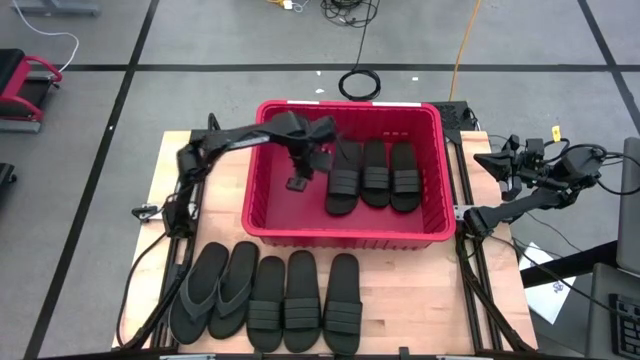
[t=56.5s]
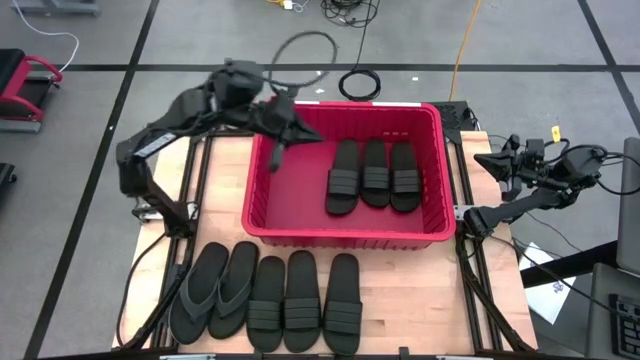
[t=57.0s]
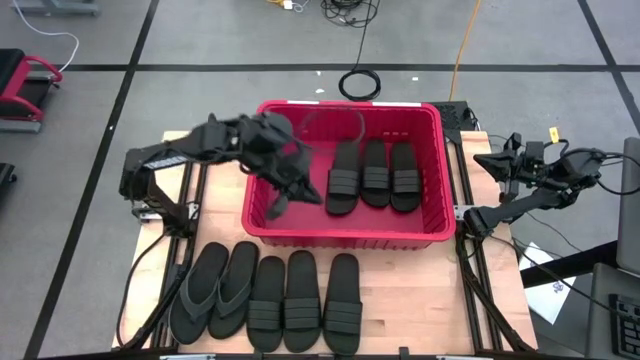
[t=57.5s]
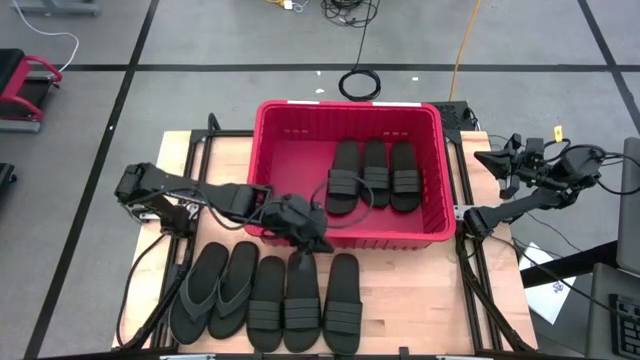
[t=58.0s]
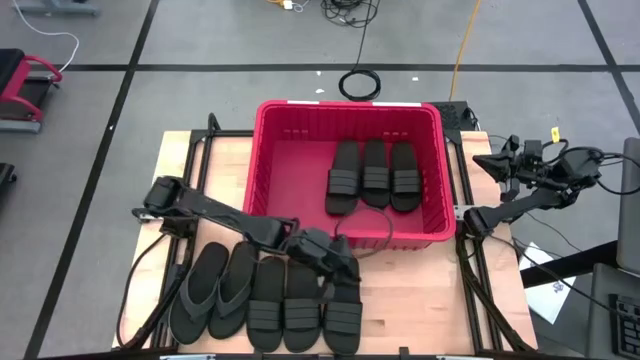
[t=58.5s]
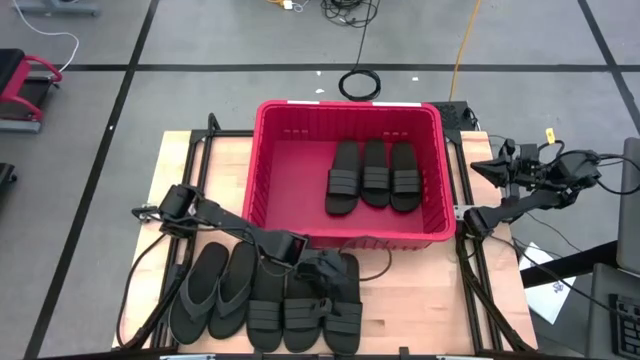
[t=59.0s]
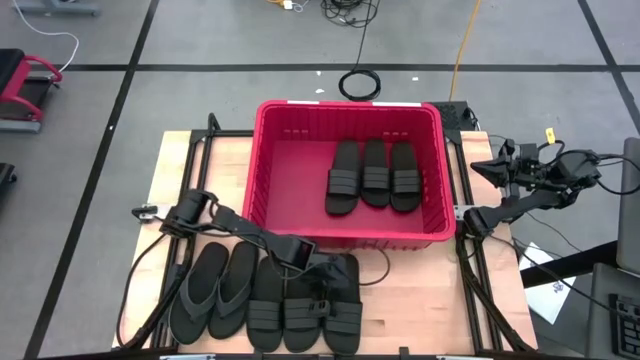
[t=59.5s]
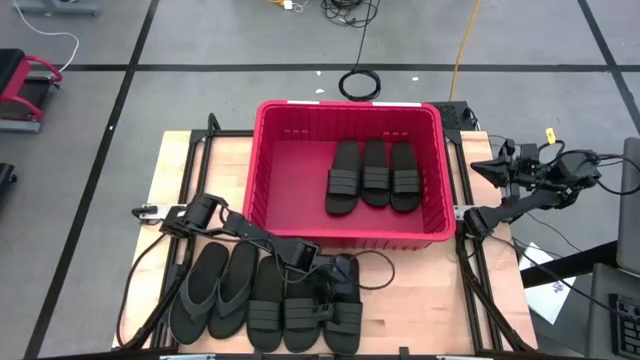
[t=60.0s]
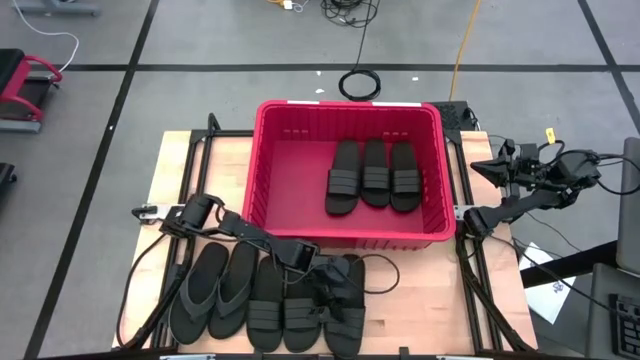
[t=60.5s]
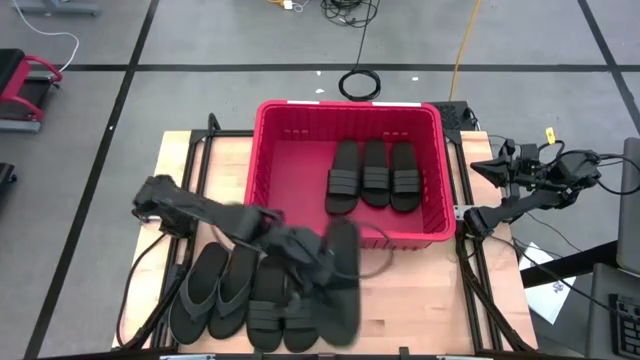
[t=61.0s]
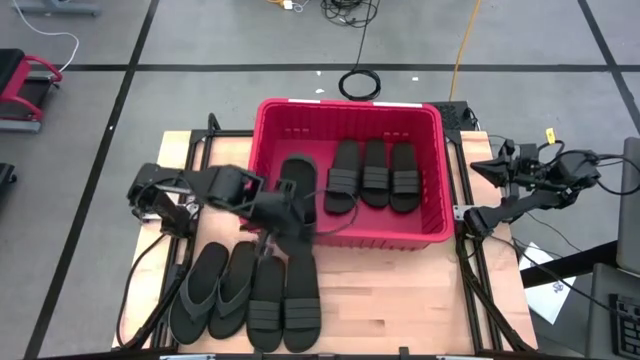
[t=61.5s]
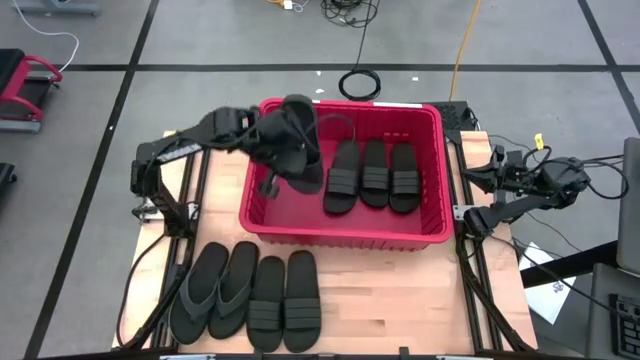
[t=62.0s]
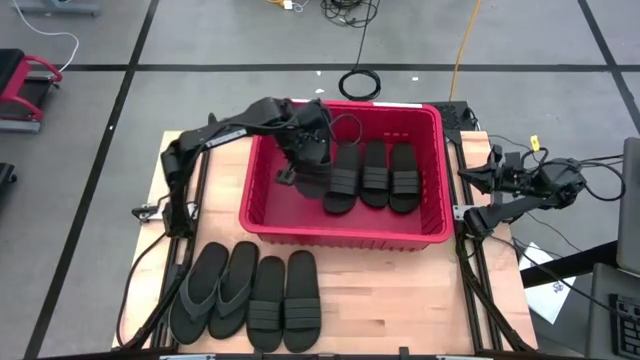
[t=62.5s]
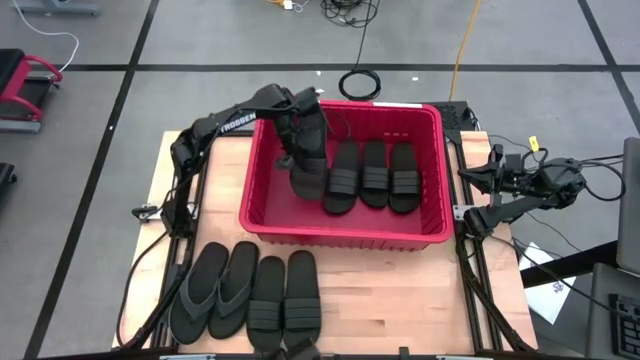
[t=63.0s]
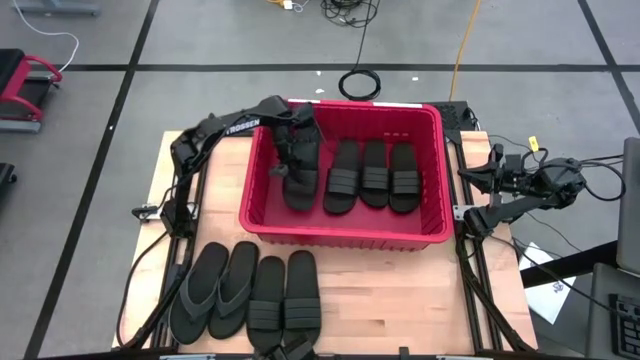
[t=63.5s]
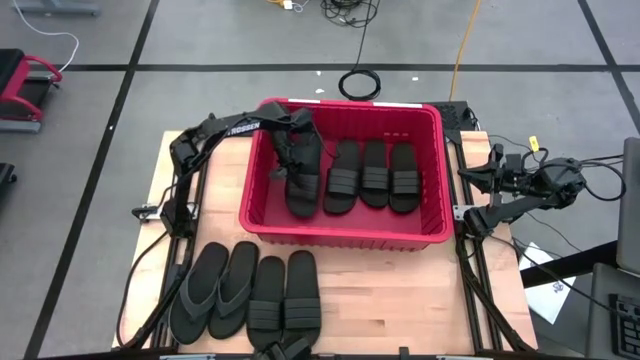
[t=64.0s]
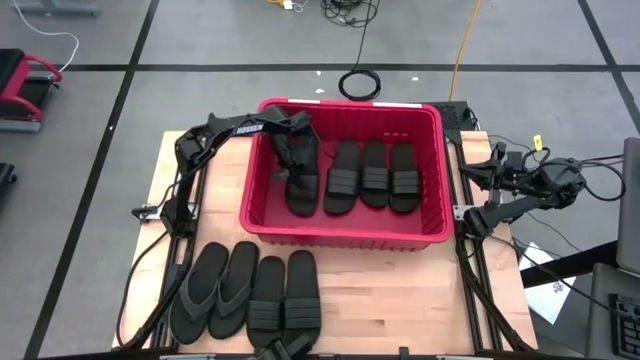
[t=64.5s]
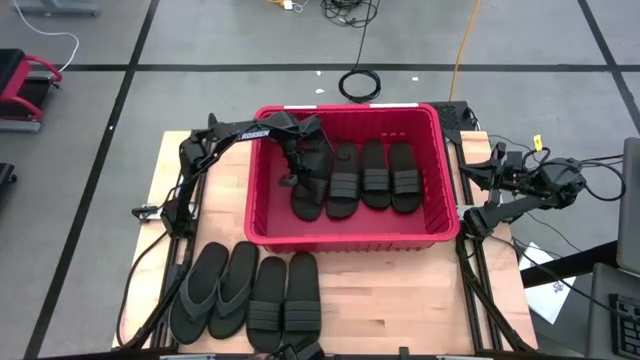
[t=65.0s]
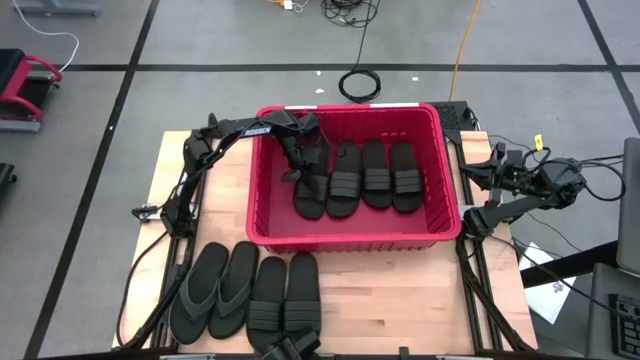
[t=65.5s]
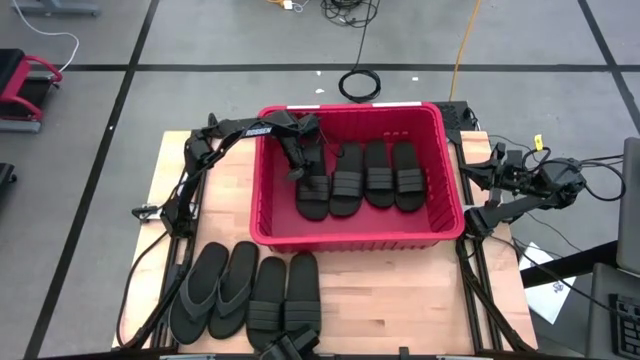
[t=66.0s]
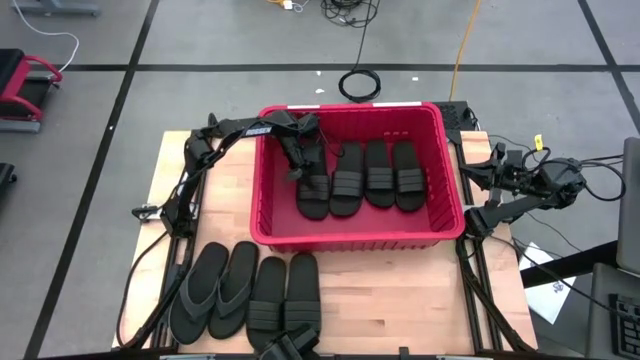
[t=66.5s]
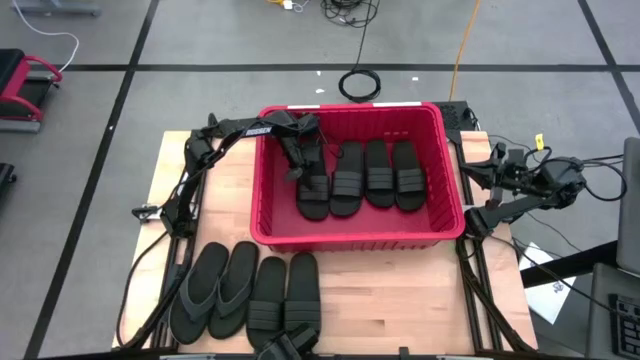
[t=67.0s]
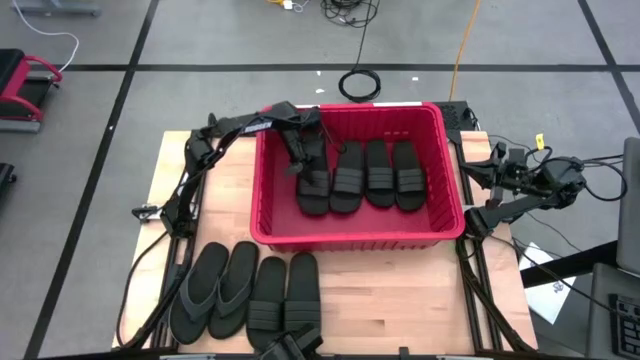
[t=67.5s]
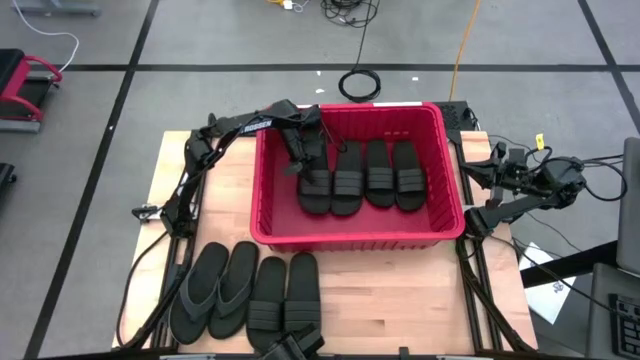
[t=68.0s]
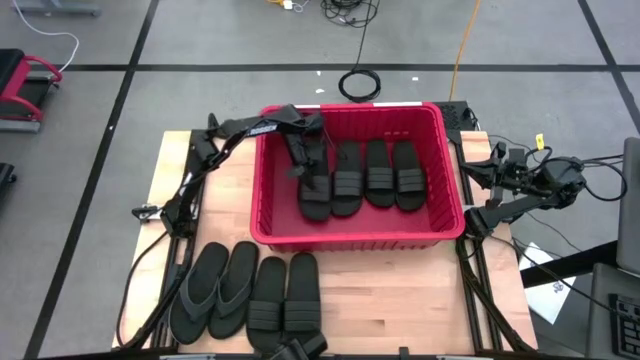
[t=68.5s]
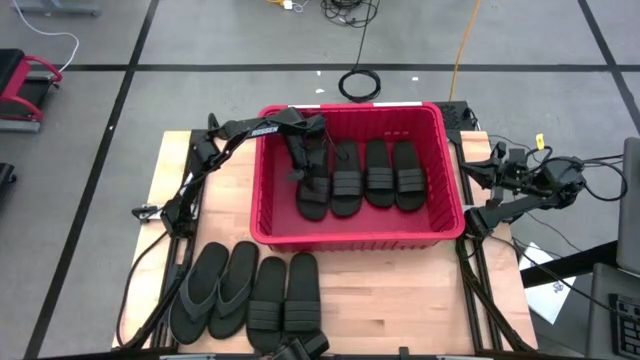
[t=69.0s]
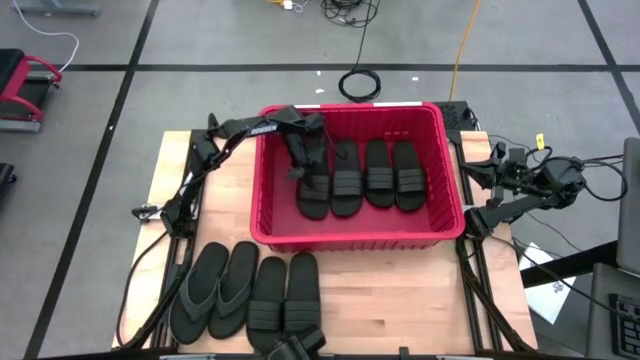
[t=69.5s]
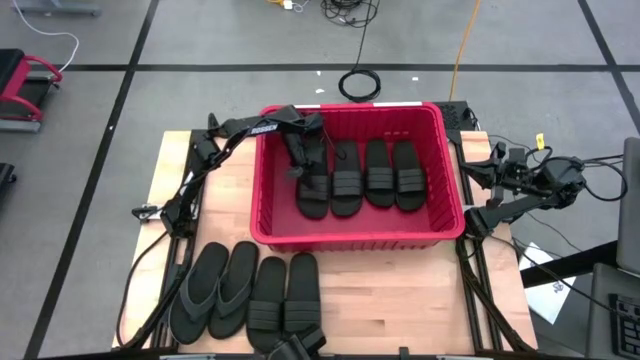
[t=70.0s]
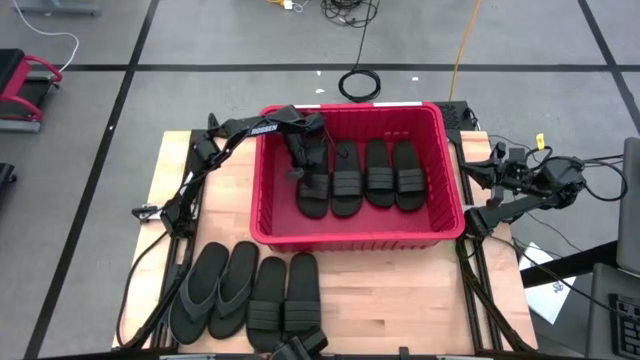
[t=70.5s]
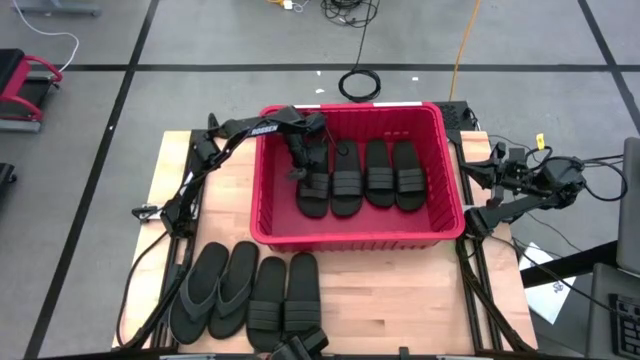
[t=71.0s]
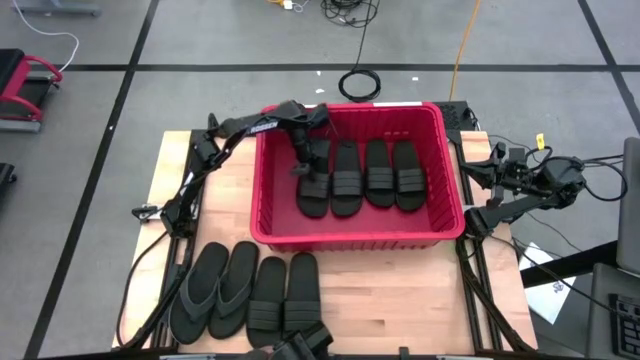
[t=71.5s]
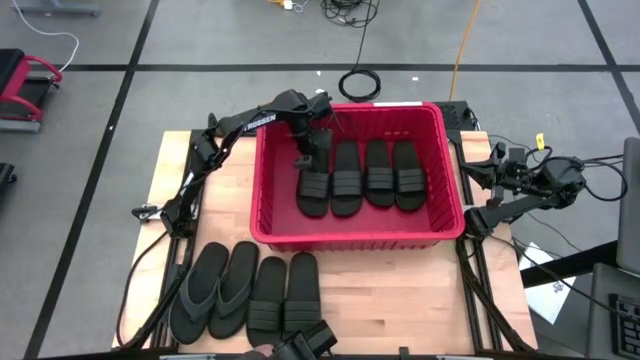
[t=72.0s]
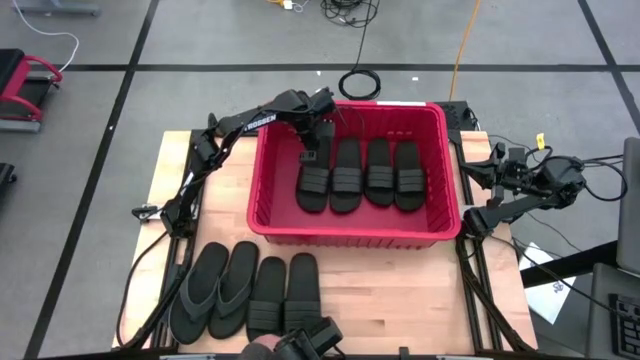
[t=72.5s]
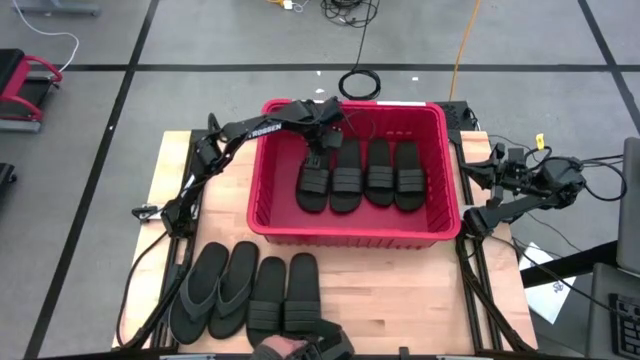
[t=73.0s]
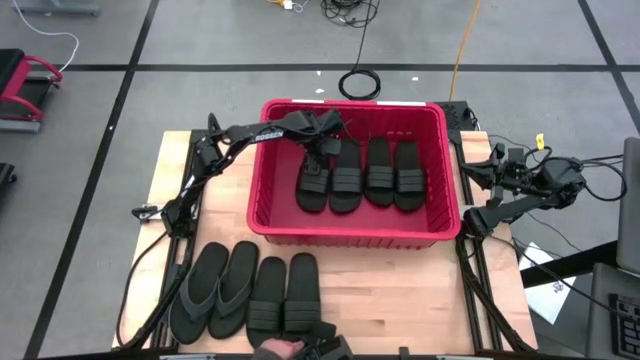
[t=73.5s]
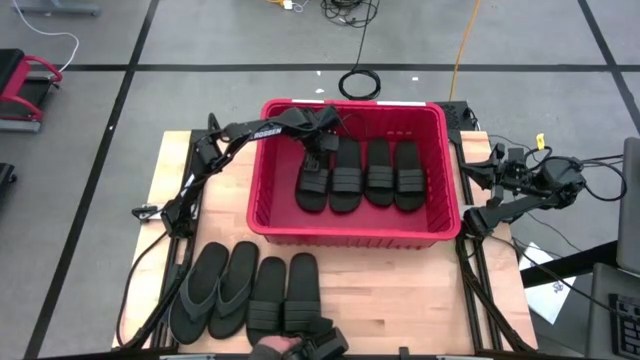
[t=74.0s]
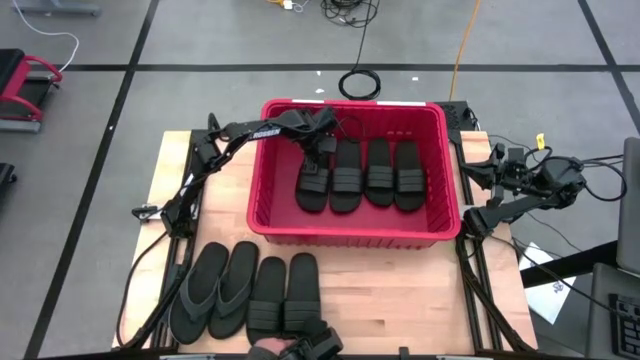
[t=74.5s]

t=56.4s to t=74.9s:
Task: Pick and place slides into bin
Put the black slide into the red bin

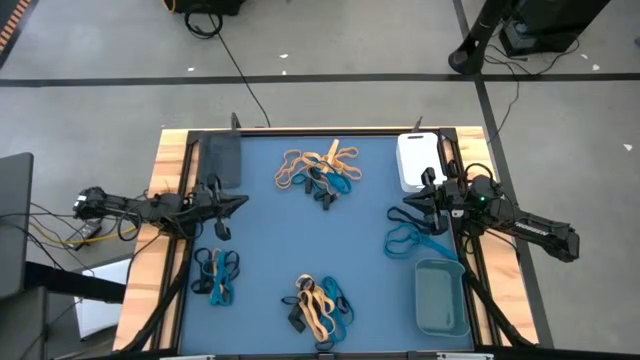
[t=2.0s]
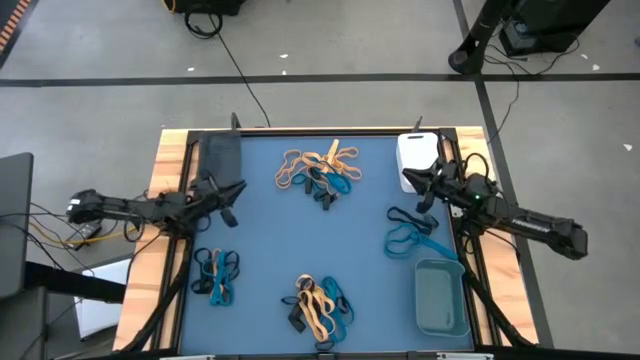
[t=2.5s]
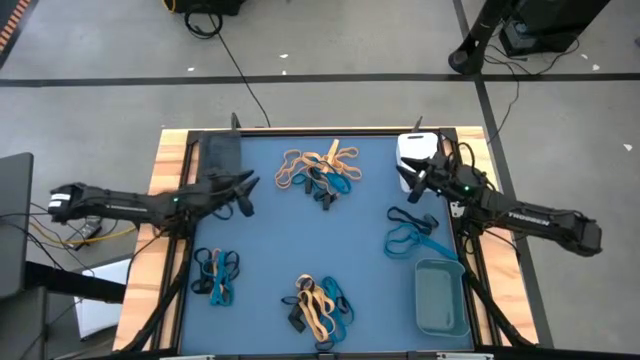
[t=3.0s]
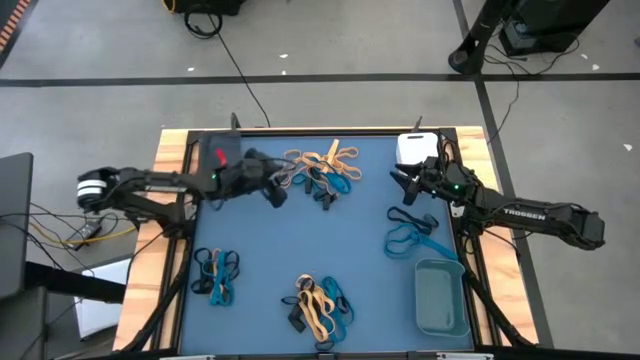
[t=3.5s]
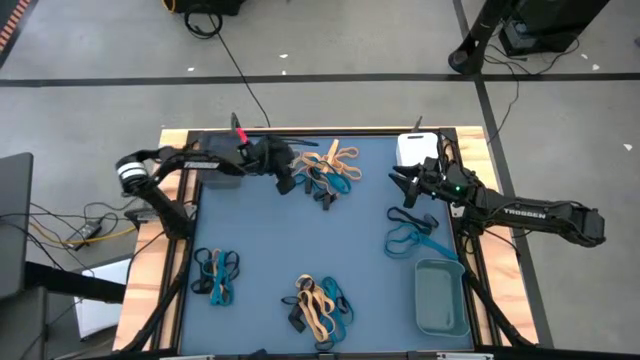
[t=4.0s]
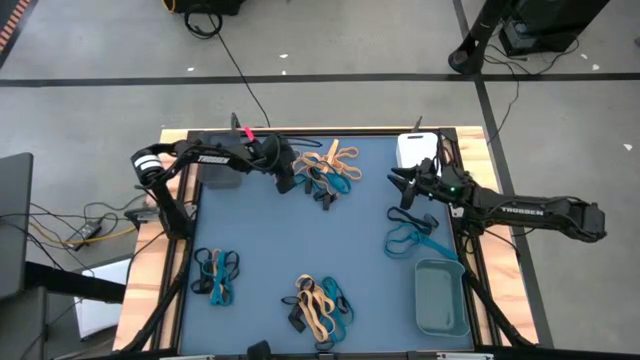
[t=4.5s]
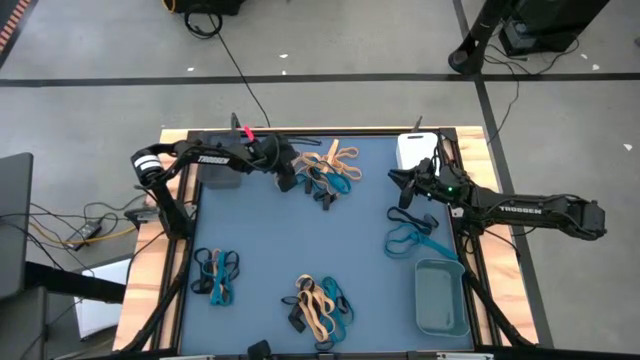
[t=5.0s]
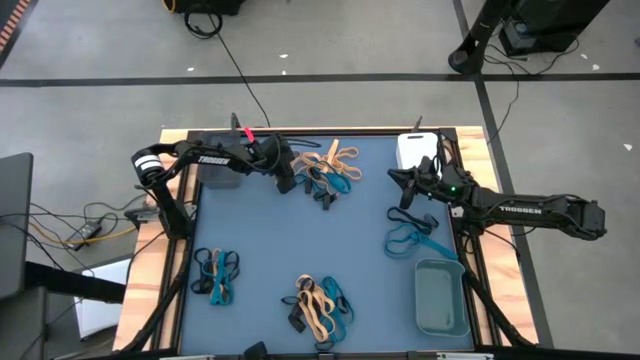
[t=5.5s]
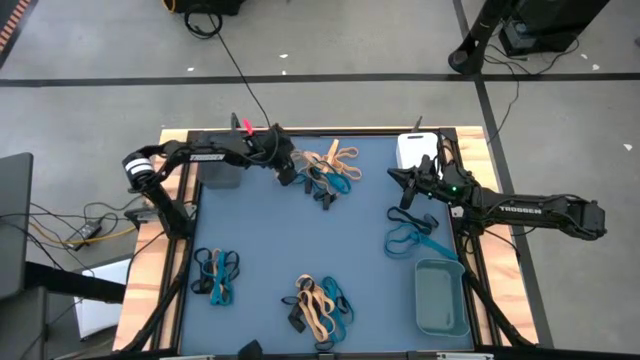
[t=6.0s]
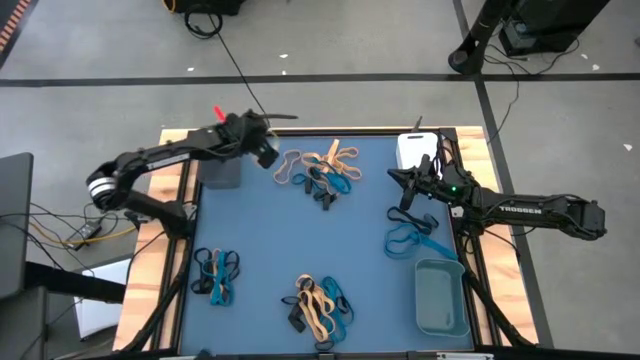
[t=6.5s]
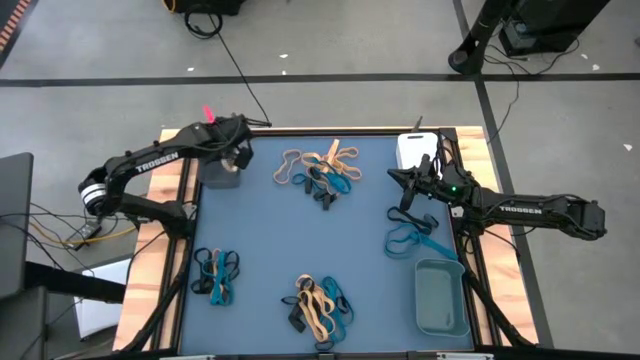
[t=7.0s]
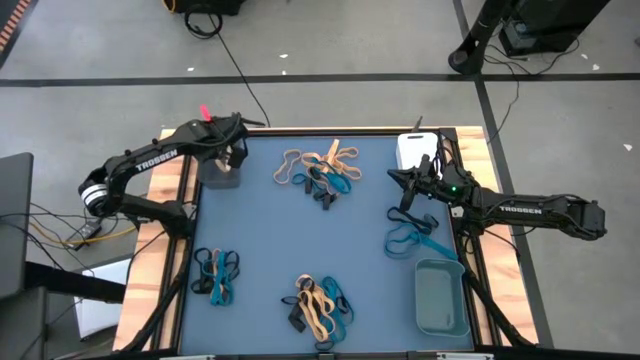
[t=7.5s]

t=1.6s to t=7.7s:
Task: Sort rubber bands into baskets
Put the yellow rubber band into the black bin
